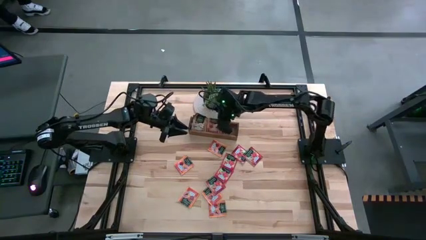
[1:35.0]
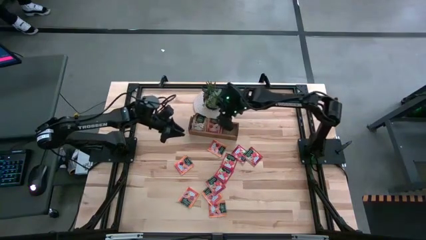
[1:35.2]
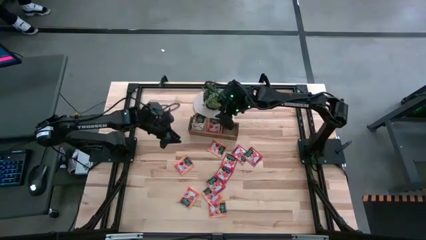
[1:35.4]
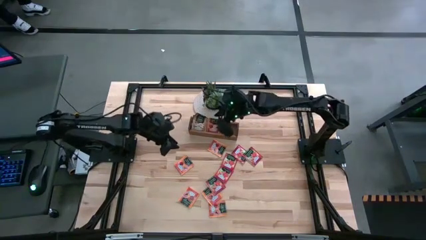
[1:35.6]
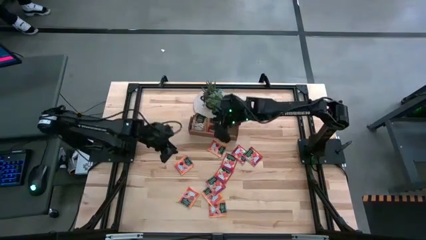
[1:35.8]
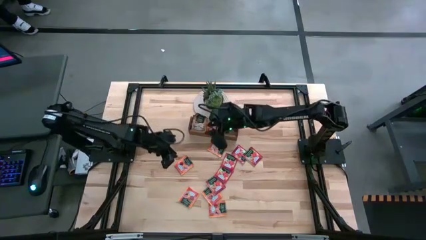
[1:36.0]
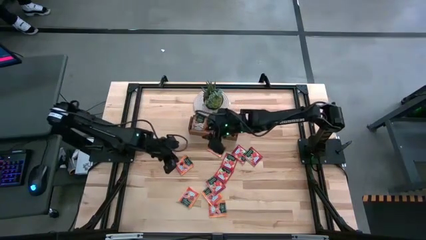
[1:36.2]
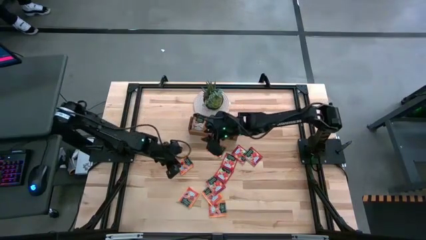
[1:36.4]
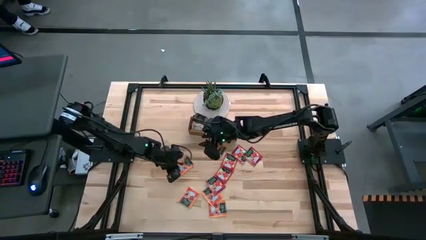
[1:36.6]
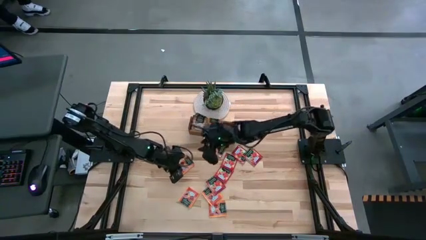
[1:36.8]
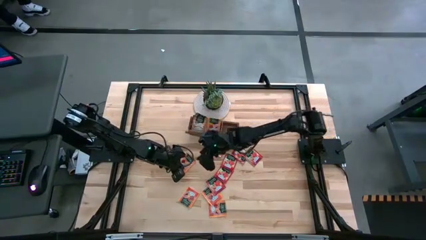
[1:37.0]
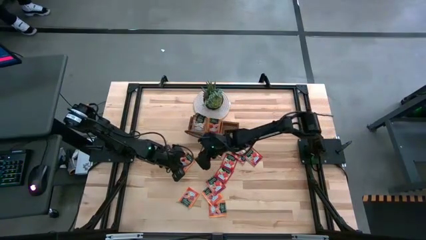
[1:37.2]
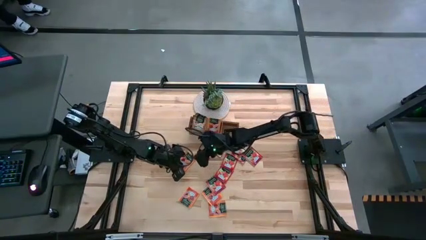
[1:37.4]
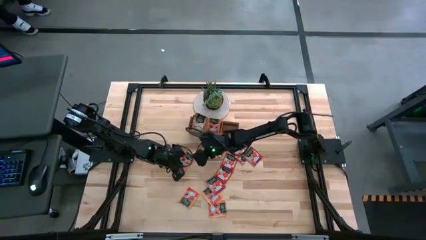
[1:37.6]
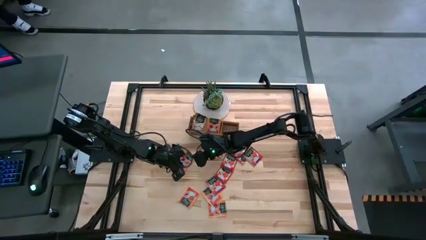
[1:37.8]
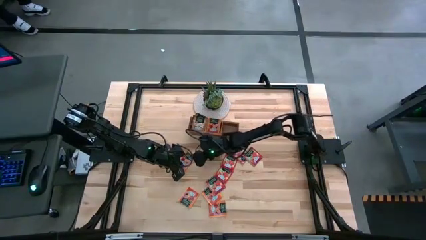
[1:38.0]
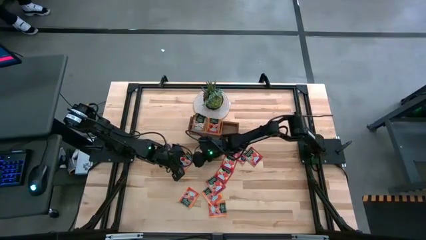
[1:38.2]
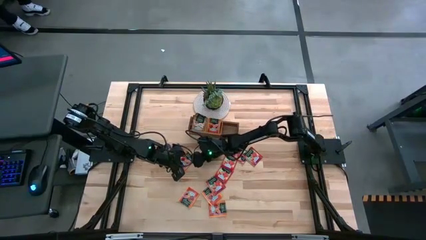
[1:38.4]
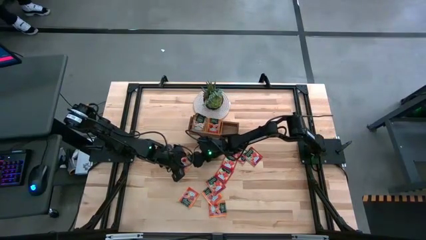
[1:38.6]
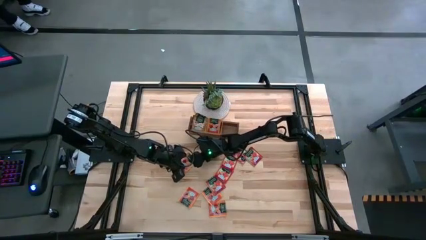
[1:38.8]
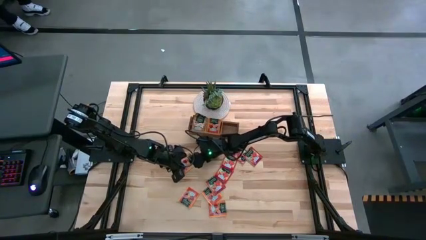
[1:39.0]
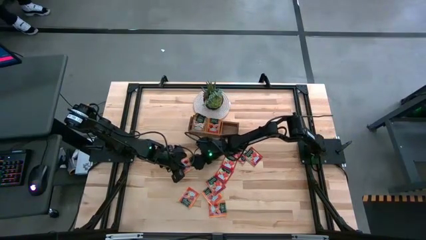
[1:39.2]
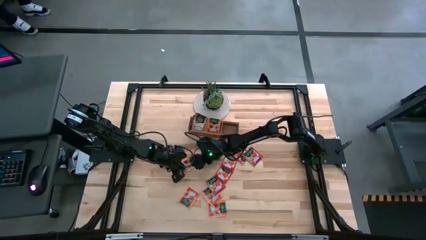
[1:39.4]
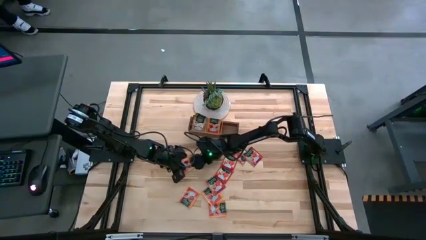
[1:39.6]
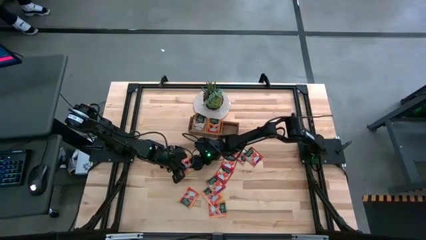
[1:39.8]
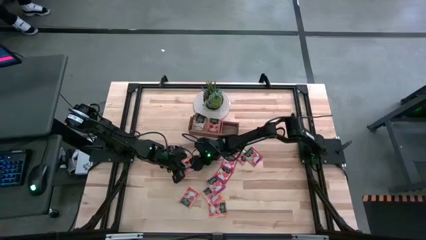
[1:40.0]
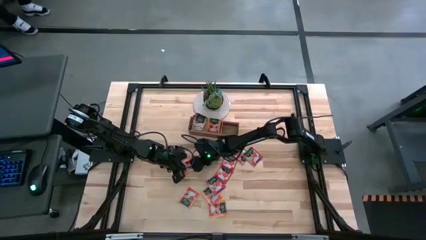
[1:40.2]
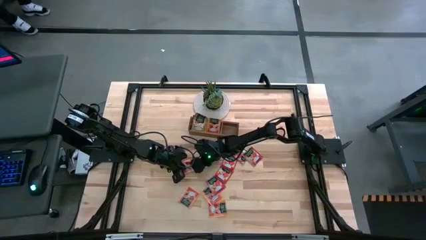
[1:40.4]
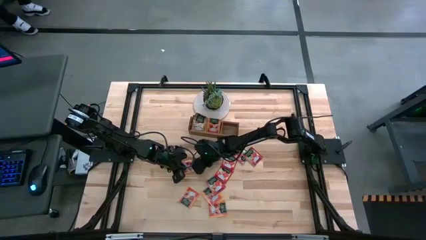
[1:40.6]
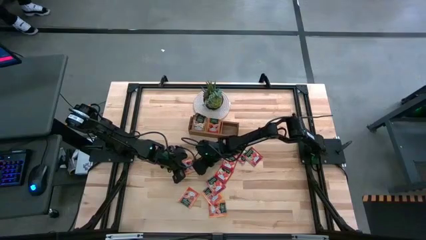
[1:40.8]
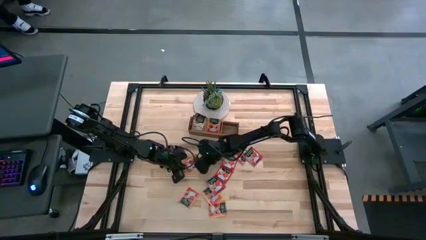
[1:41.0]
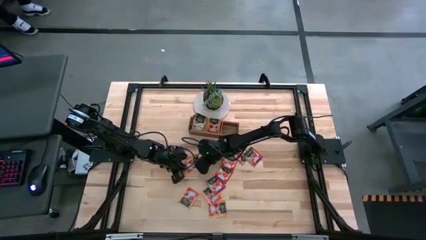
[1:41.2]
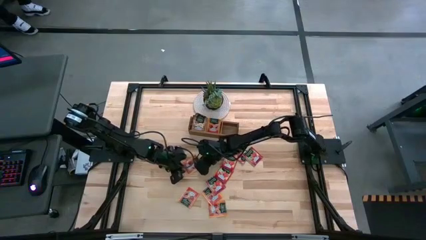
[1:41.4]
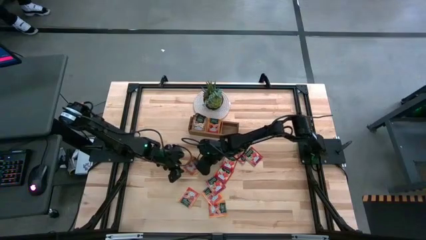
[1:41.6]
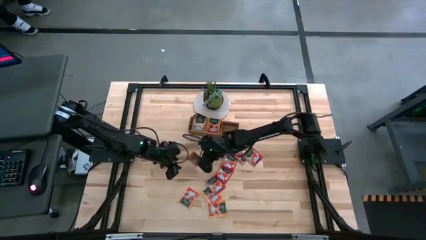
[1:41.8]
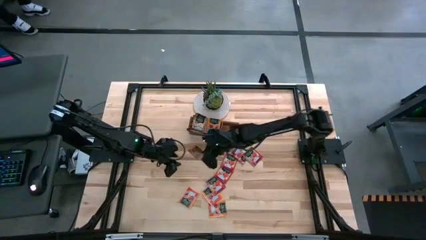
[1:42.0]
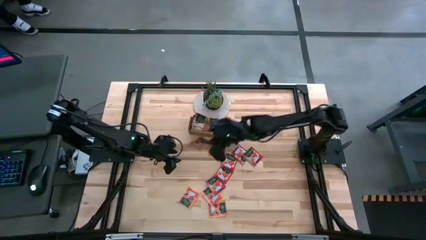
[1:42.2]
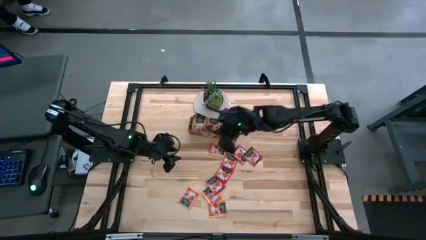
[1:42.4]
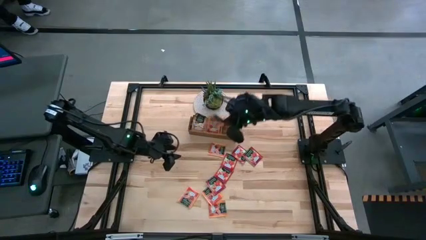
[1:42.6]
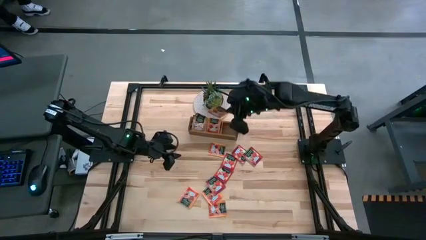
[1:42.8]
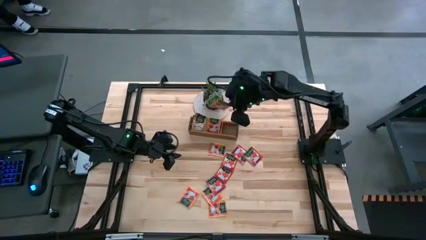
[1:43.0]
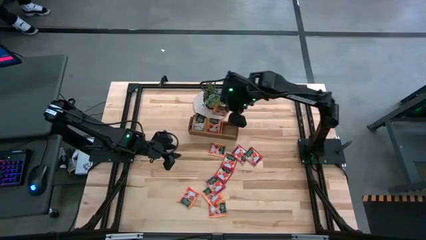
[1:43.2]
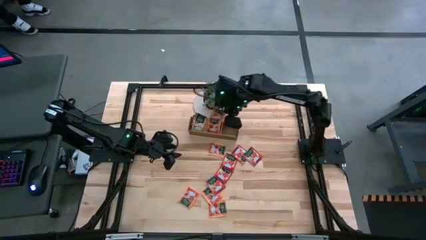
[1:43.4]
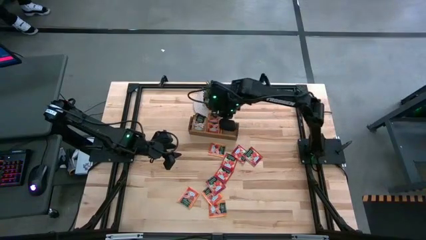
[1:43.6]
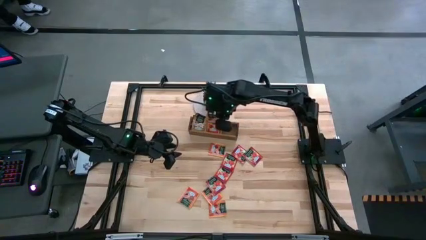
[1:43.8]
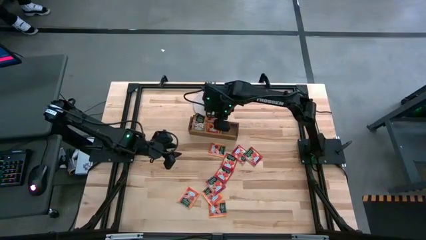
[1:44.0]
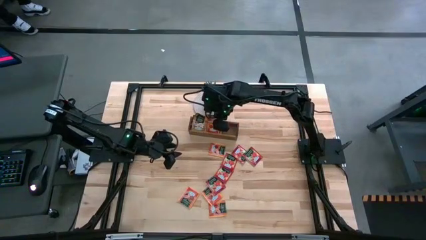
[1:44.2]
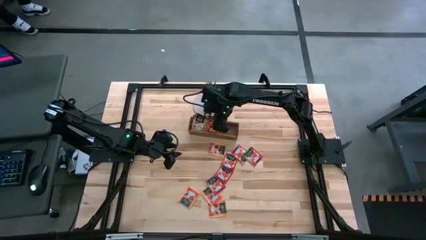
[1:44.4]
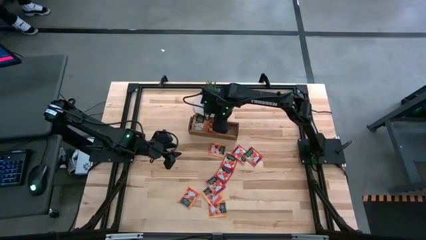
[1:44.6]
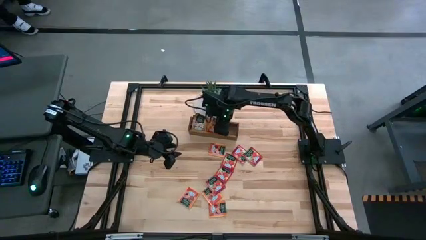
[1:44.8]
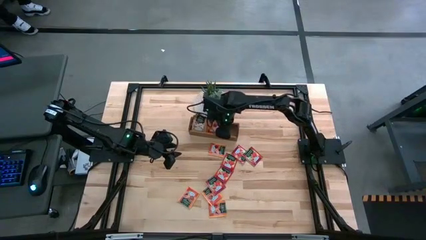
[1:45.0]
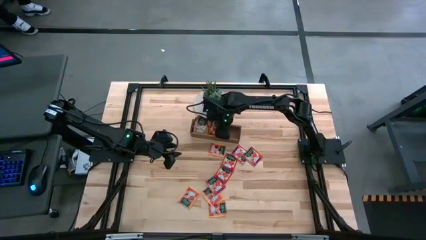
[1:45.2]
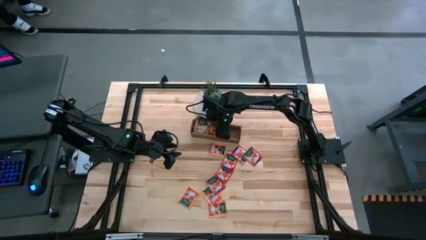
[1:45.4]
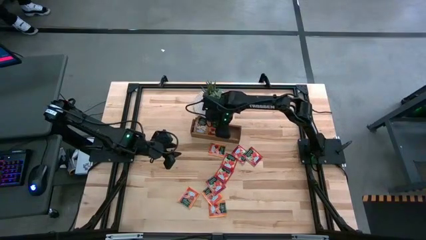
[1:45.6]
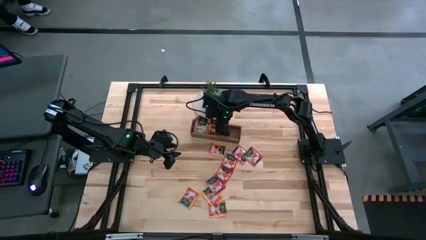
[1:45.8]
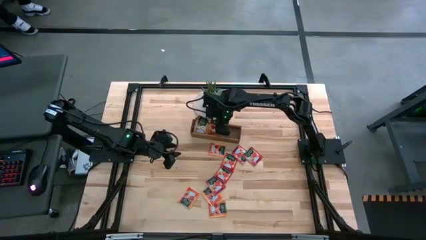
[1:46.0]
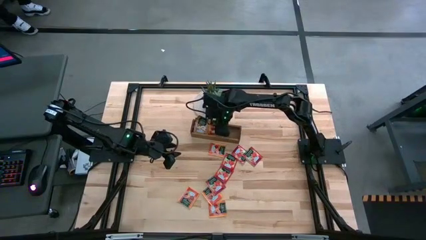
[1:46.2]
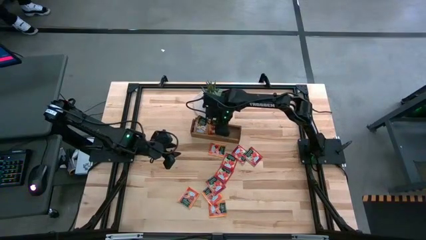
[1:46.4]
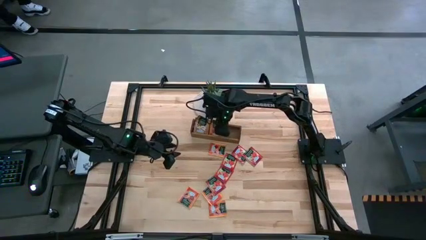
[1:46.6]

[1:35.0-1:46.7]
Task: Pick & Place Tea
Put the orange tea bag into the middle section of the wooden organizer

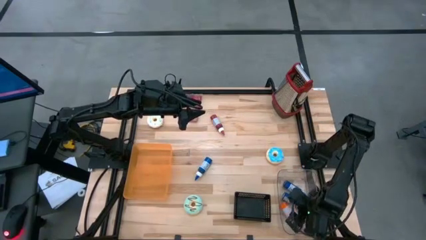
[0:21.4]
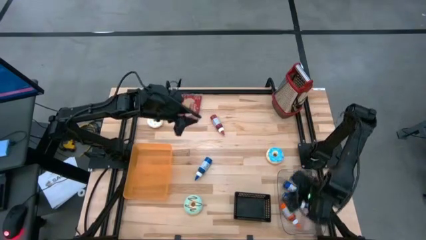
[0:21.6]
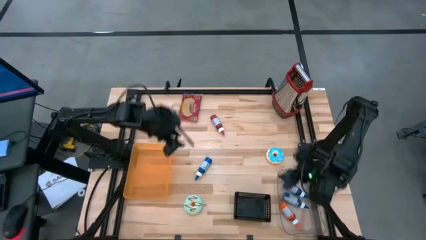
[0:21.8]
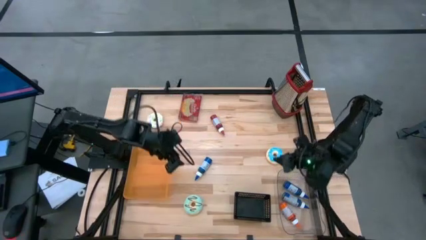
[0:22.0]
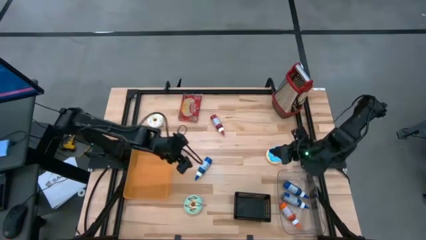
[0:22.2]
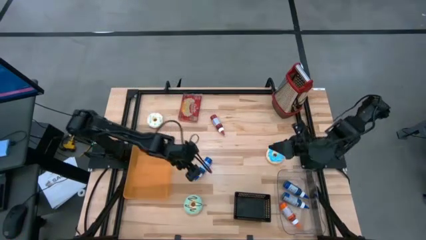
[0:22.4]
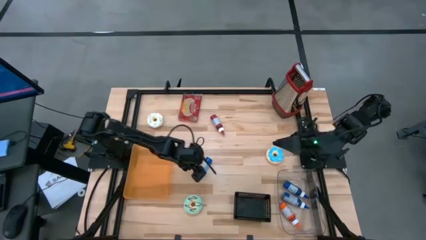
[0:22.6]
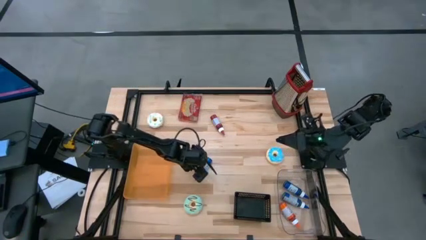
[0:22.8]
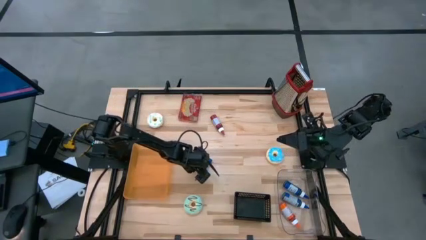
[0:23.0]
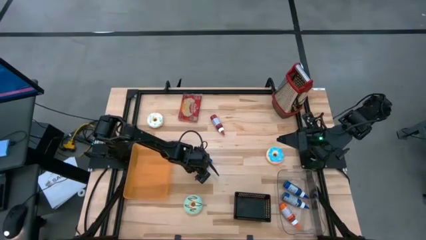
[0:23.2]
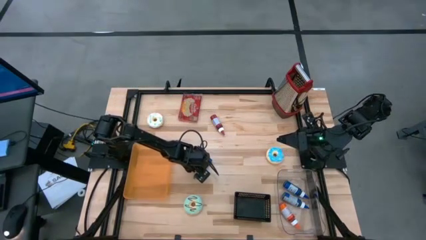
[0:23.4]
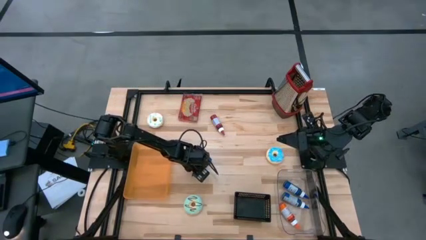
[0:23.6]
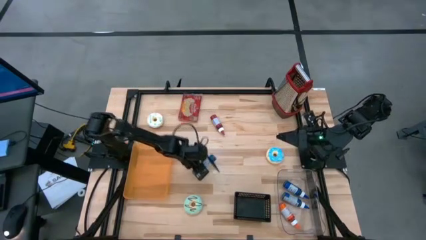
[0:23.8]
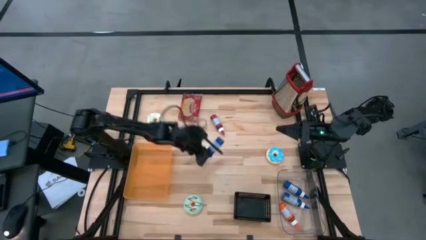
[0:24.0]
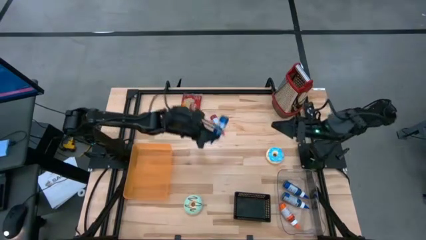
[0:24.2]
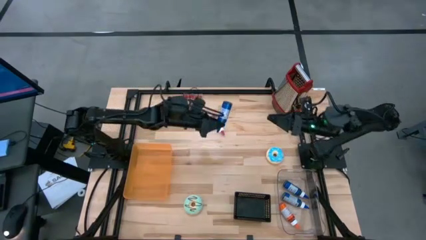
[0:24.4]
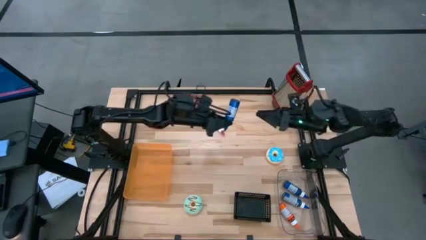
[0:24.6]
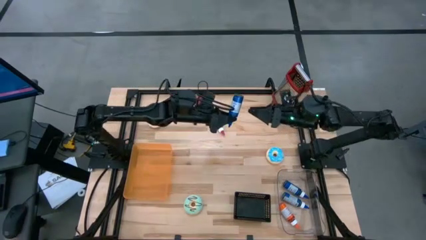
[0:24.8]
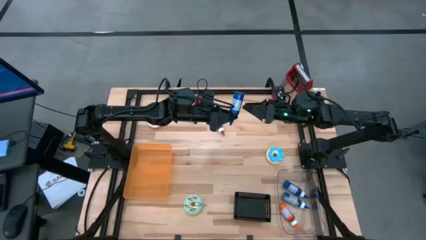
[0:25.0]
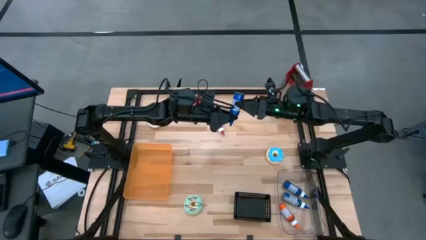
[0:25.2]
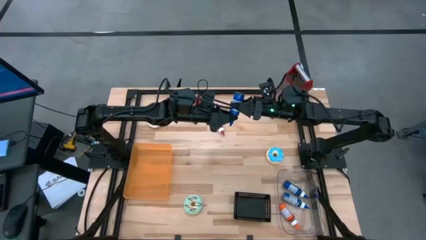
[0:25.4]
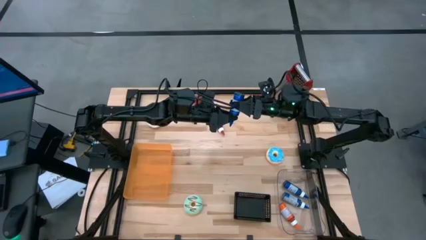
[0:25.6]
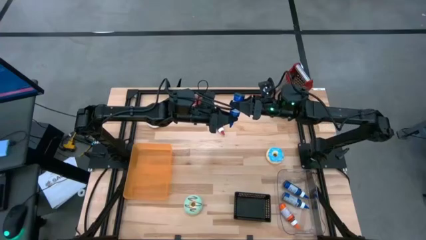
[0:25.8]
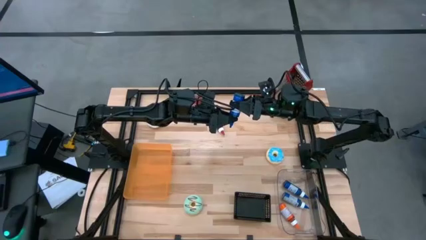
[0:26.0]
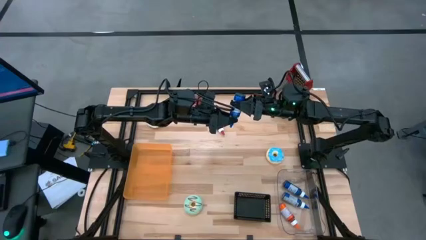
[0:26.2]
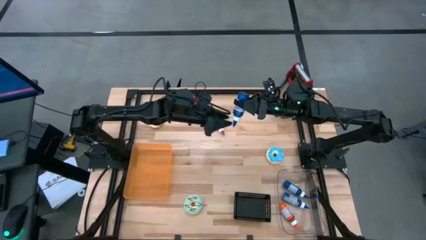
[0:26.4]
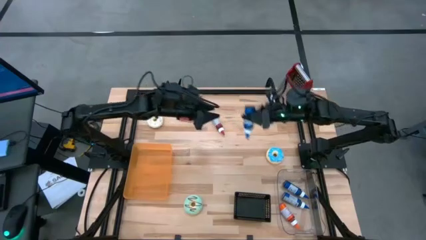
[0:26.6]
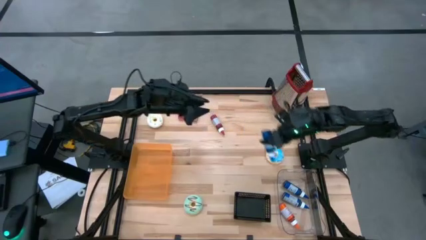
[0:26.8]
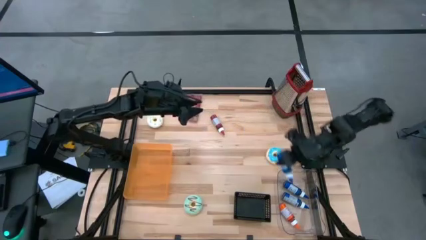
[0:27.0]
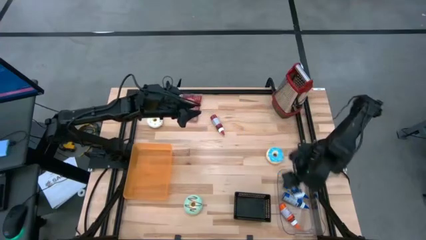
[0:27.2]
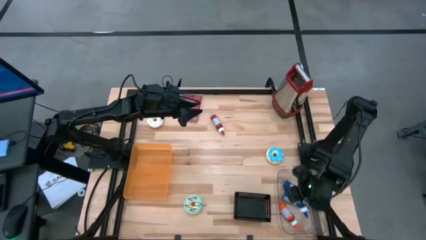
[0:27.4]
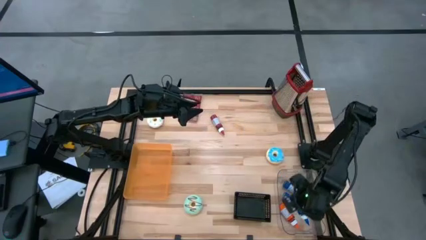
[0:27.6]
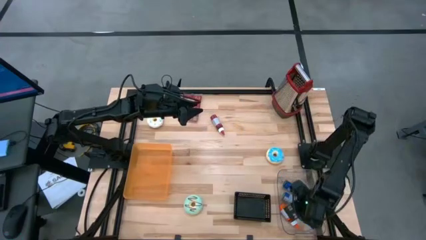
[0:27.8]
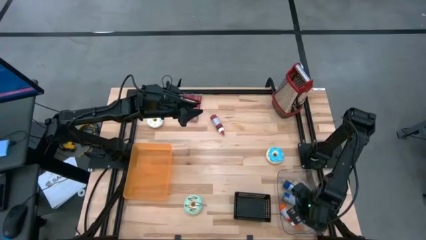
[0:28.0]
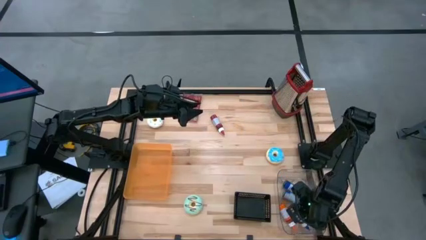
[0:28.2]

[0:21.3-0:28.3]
Task: Pick & Place Food Item
Put the blue food coloring bottle into the transparent bin
